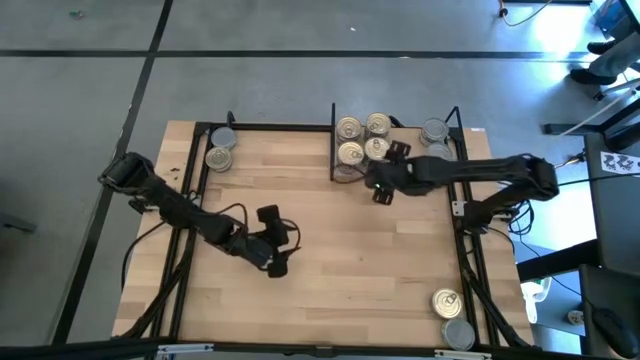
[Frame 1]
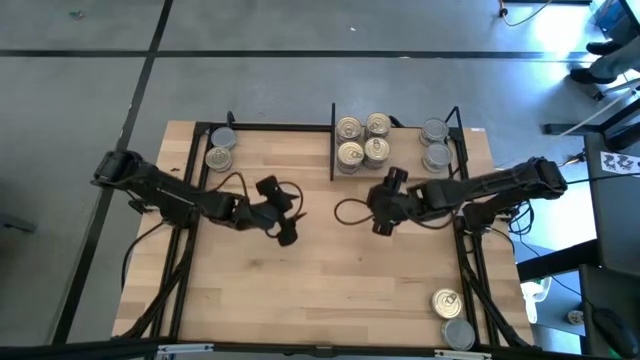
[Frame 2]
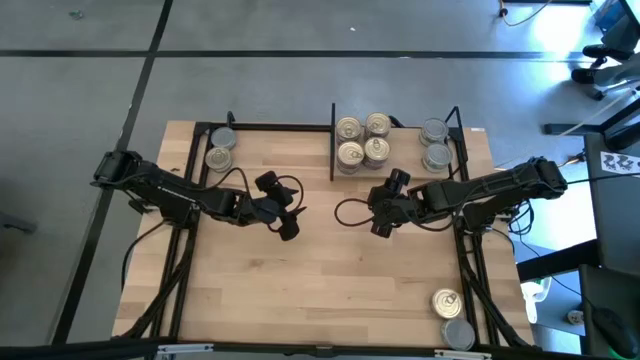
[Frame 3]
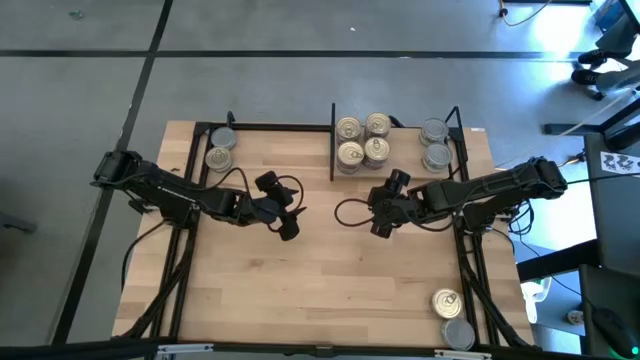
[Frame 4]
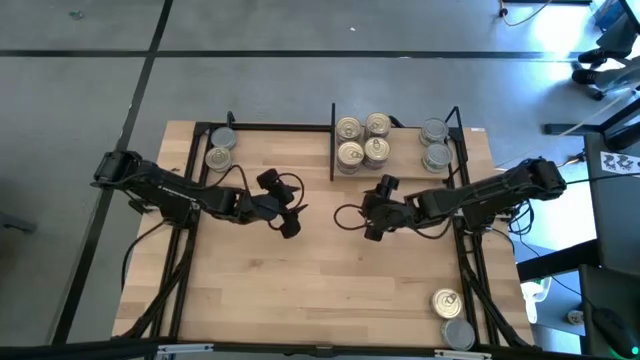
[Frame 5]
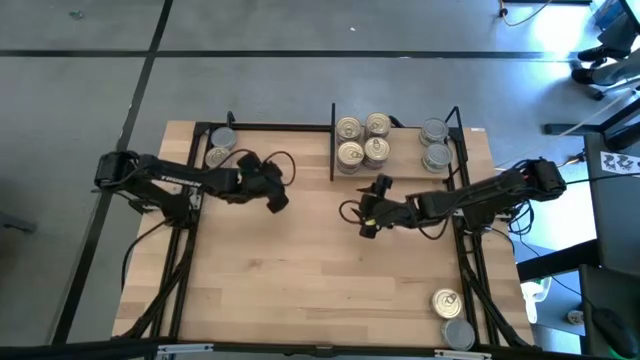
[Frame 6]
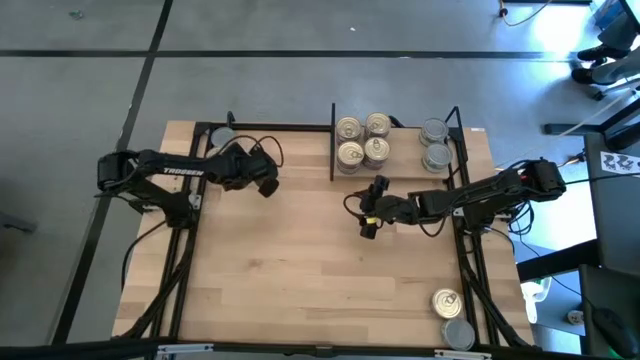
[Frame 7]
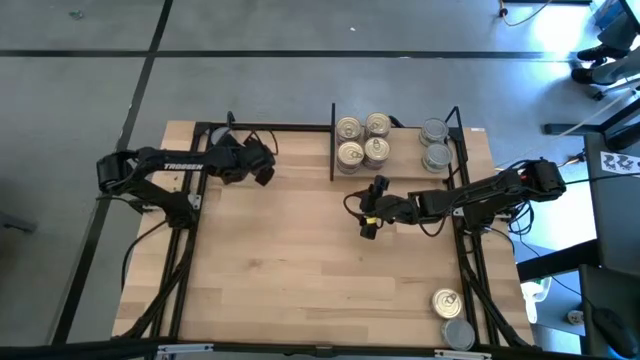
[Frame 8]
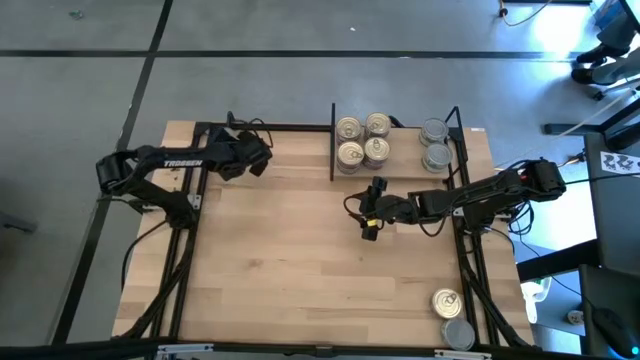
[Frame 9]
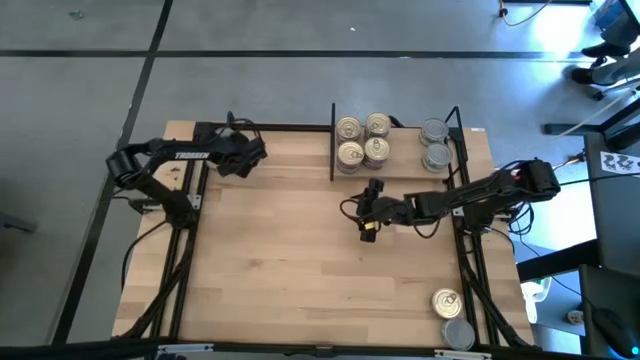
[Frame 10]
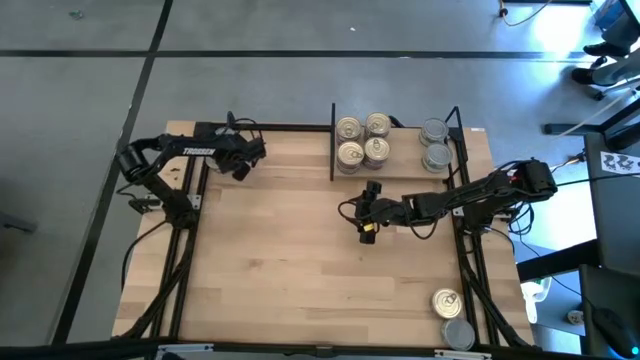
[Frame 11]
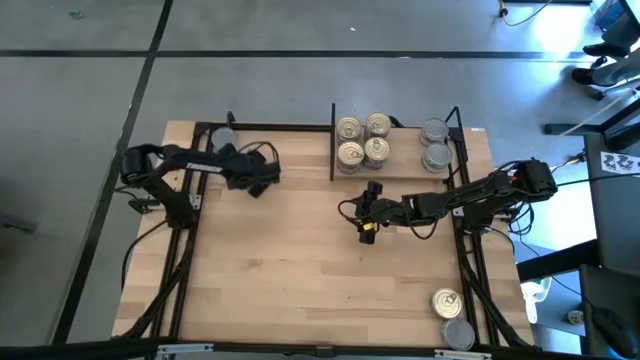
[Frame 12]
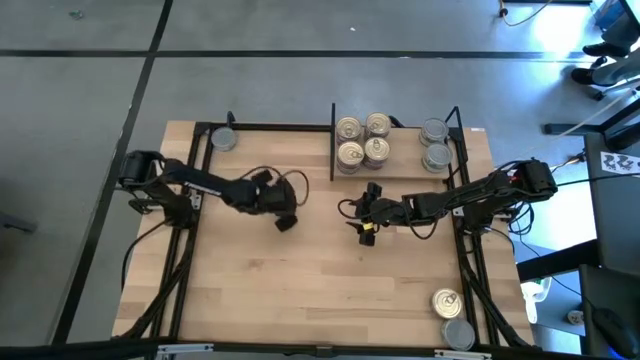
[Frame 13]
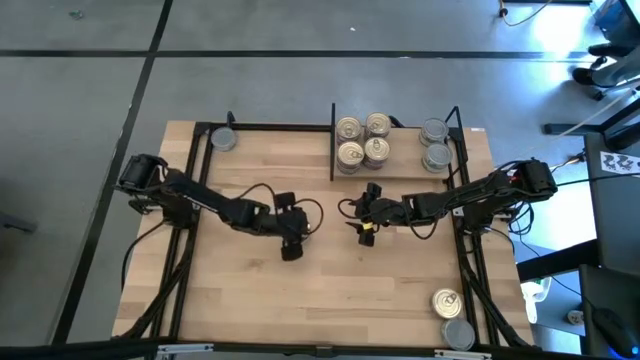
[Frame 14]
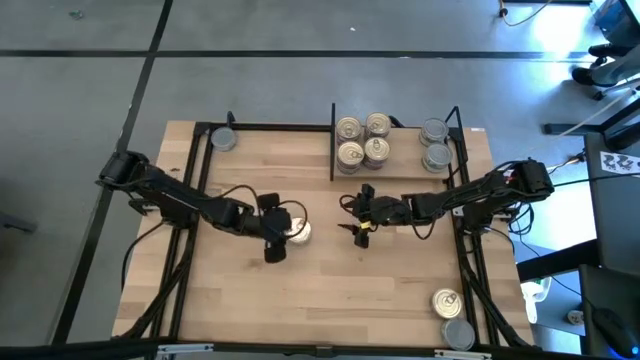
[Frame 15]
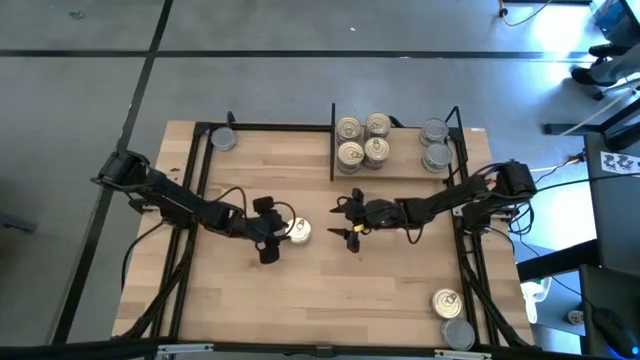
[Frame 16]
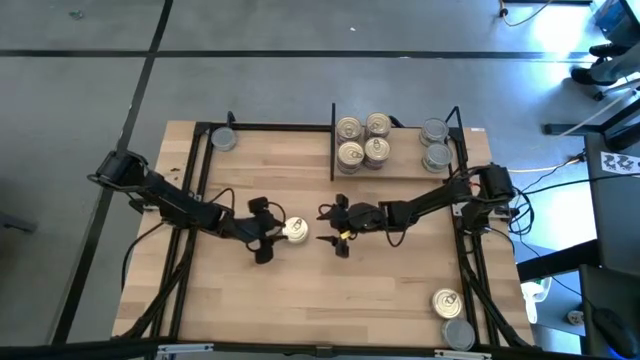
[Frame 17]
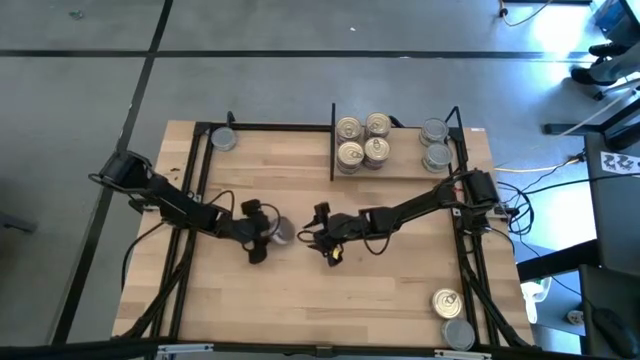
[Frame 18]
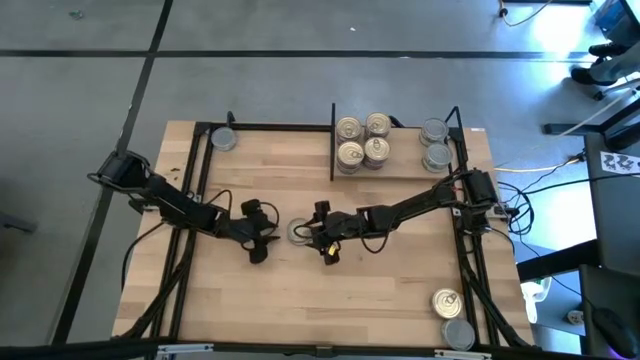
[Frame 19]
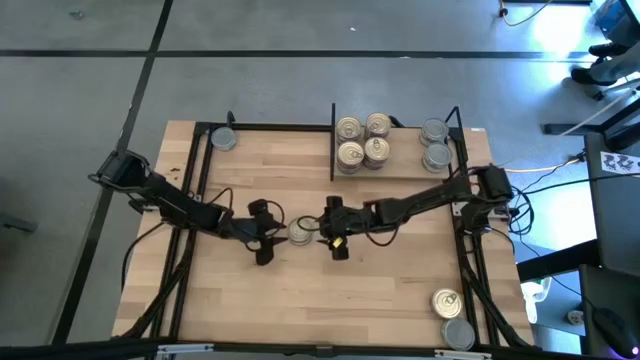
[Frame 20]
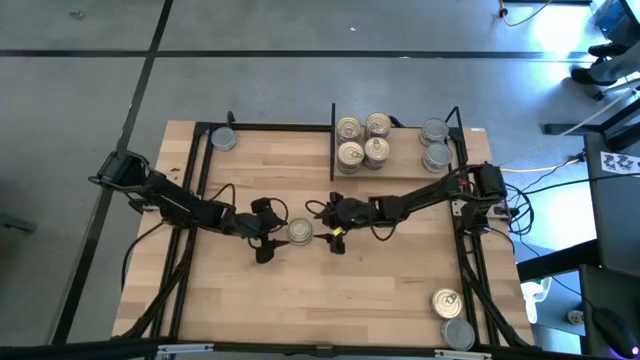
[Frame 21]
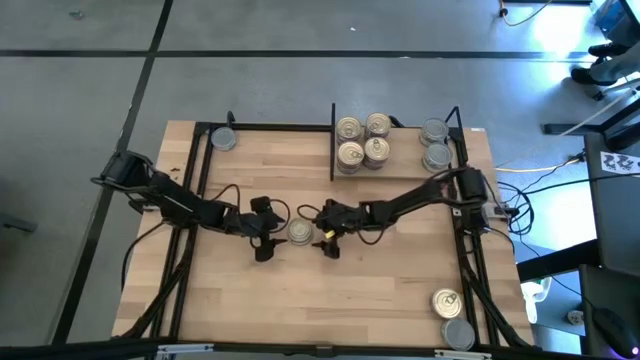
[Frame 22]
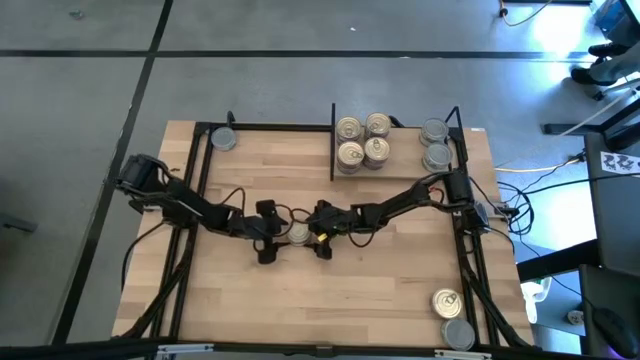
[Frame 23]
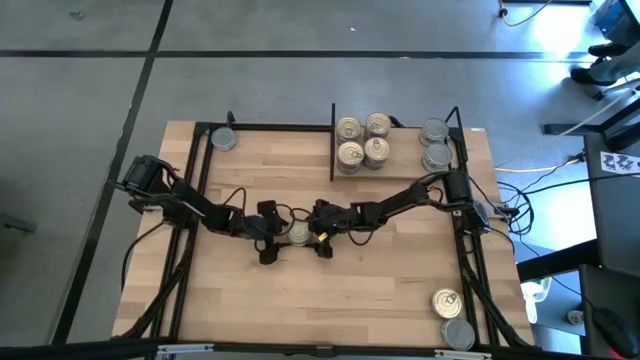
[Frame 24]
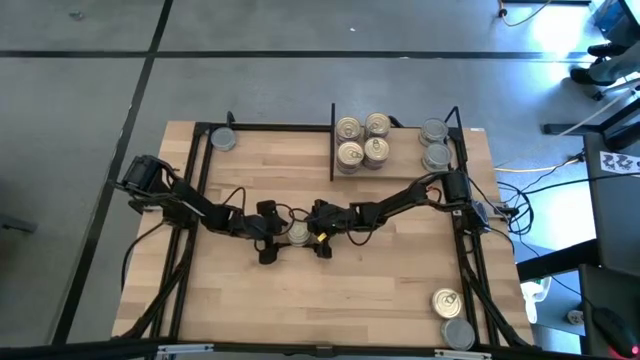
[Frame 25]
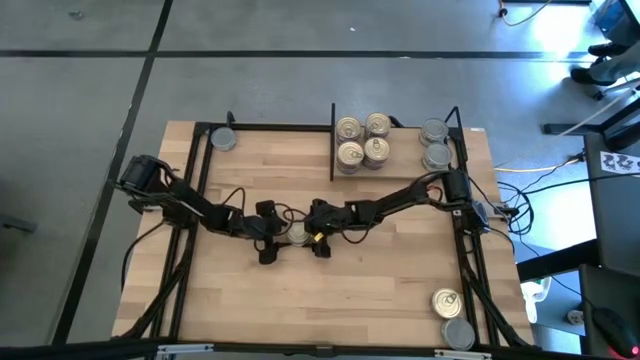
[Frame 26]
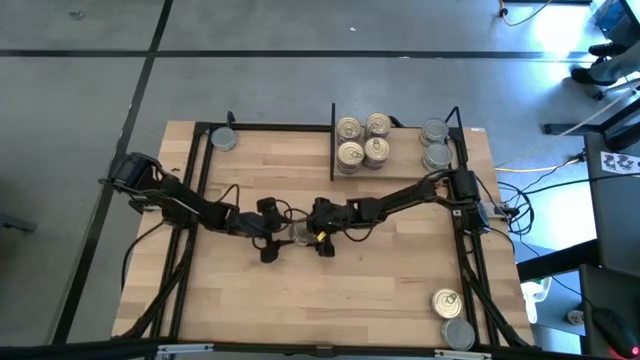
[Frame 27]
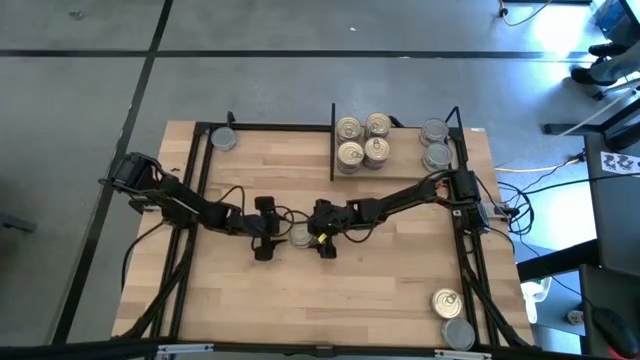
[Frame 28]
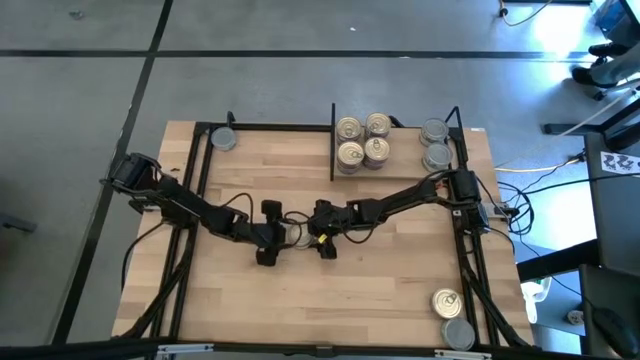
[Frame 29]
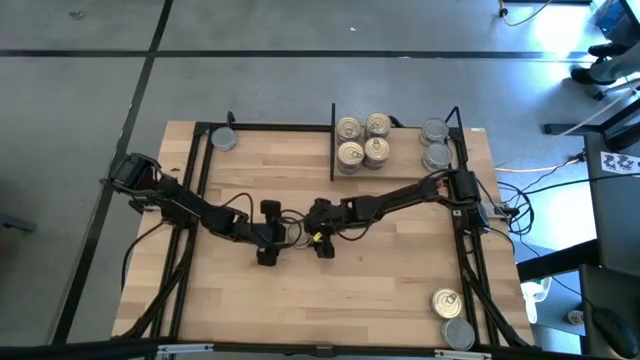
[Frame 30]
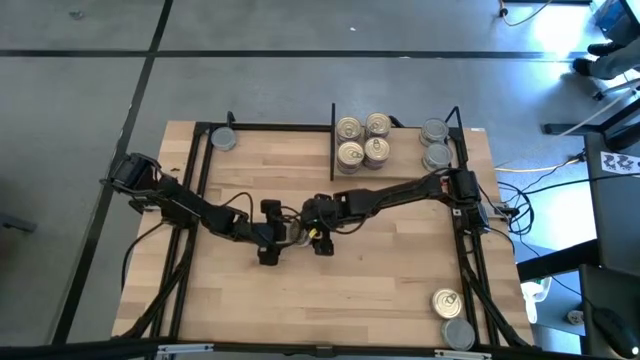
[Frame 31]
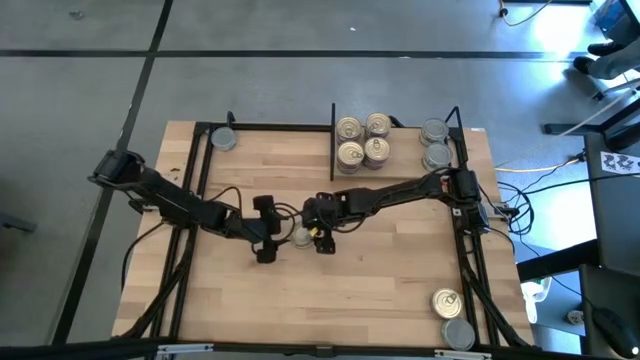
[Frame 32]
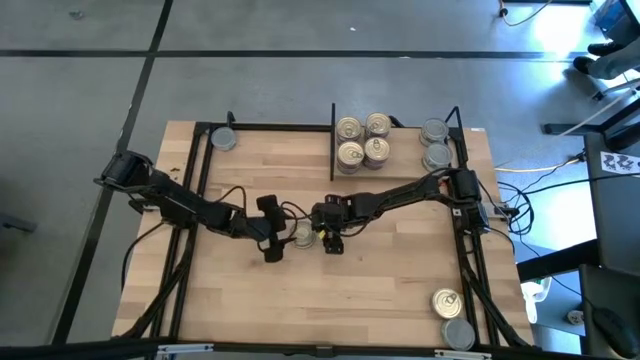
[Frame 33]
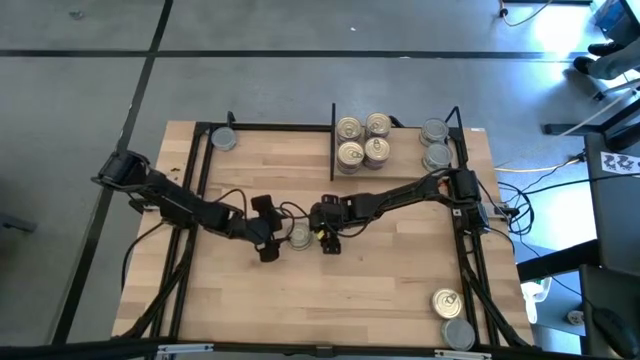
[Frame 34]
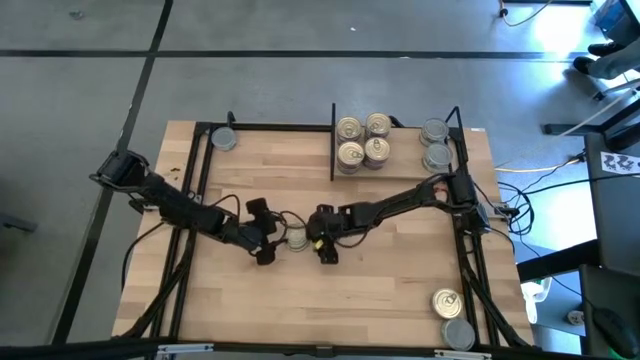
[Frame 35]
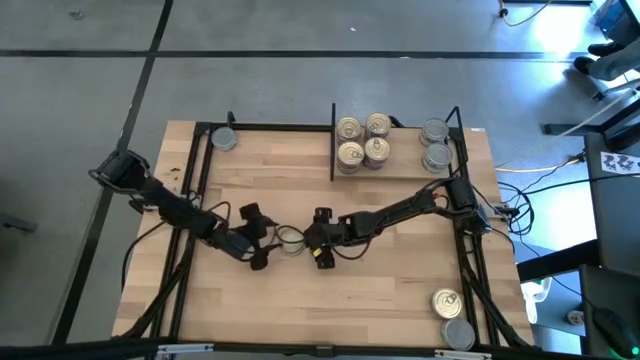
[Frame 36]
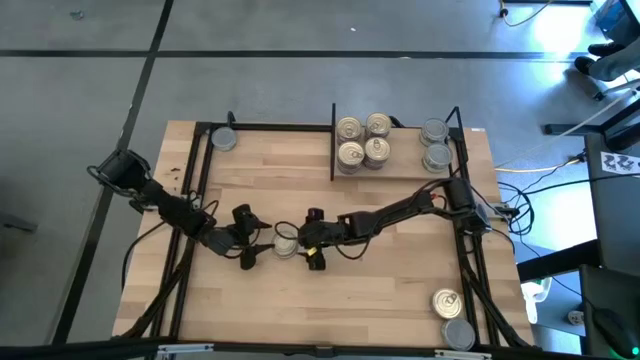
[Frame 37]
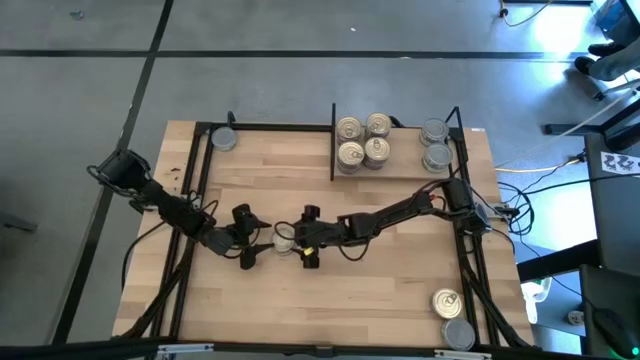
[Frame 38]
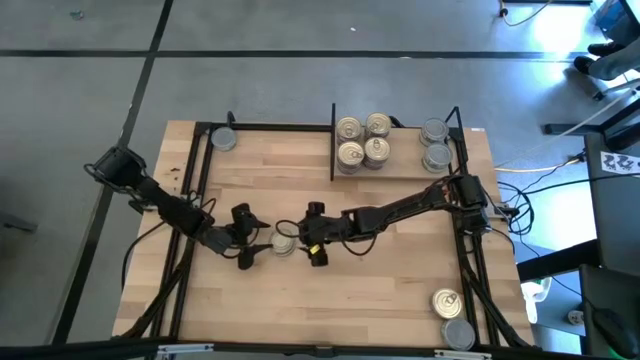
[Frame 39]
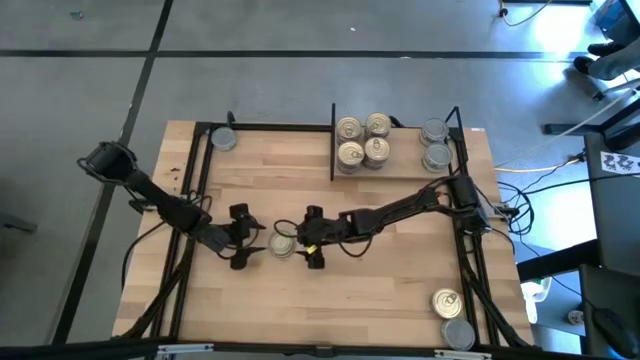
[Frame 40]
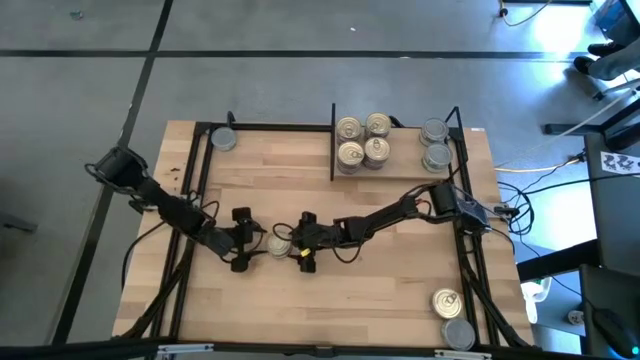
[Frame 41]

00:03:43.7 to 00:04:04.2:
Task: Stack canned seafood by type on shelf
Put the blue tuna can on the shelf

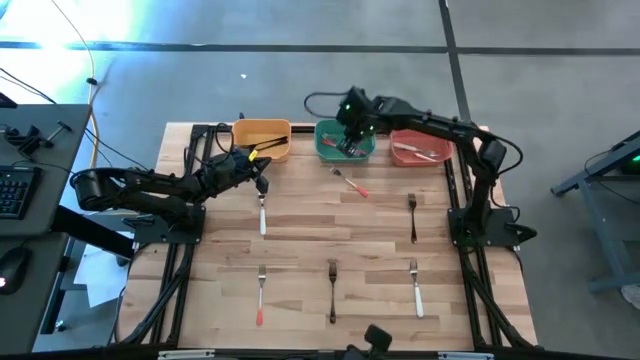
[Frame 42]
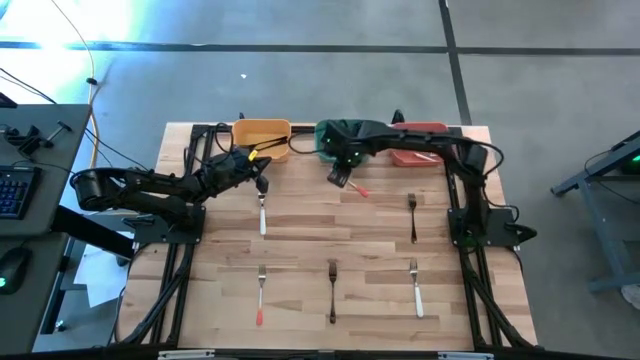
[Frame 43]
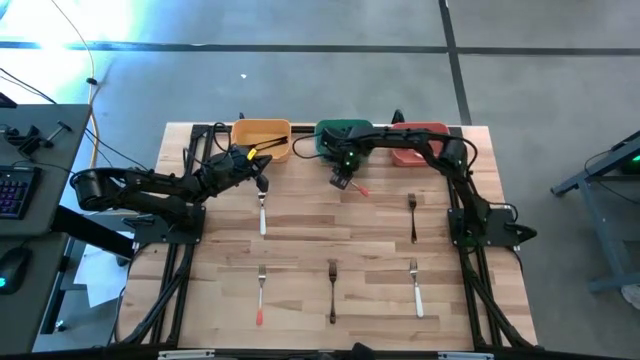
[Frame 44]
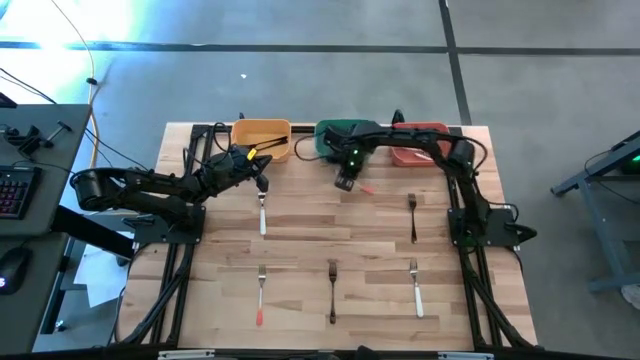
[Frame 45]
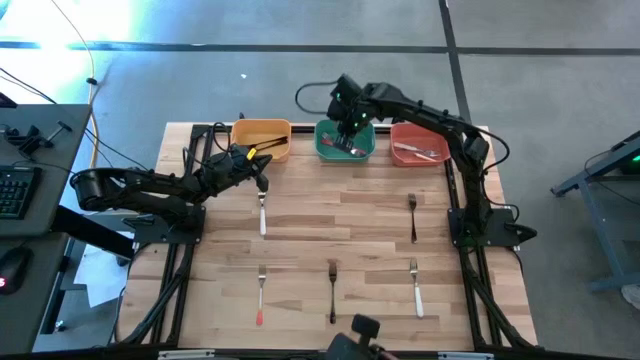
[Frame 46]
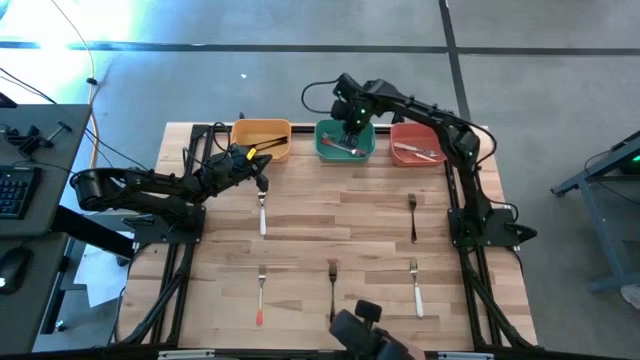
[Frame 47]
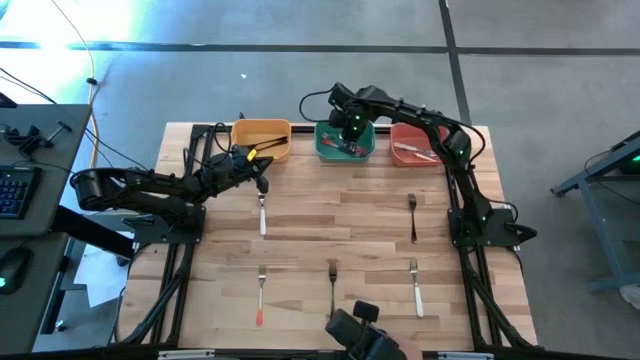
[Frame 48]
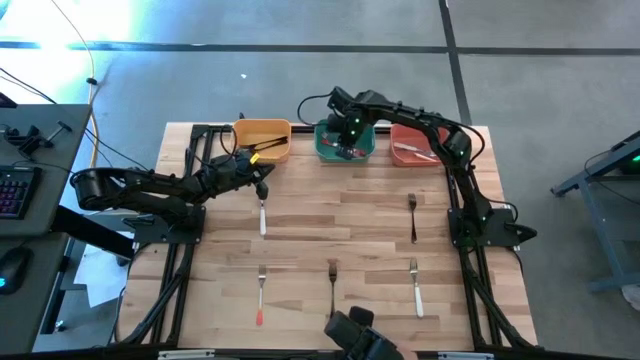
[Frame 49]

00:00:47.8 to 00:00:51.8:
Task: Sort silverware by color (type)
Put the top orange fork into the blue bin
